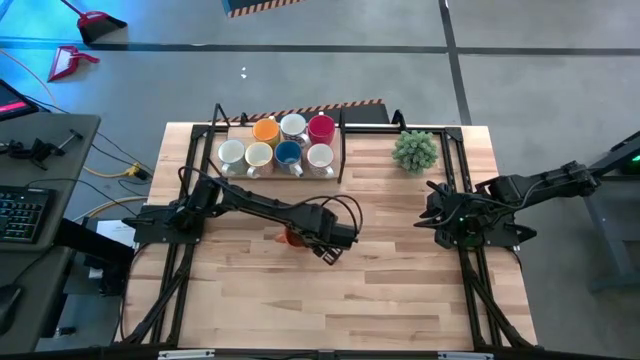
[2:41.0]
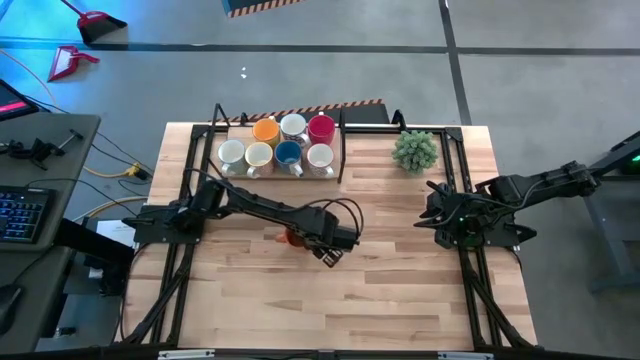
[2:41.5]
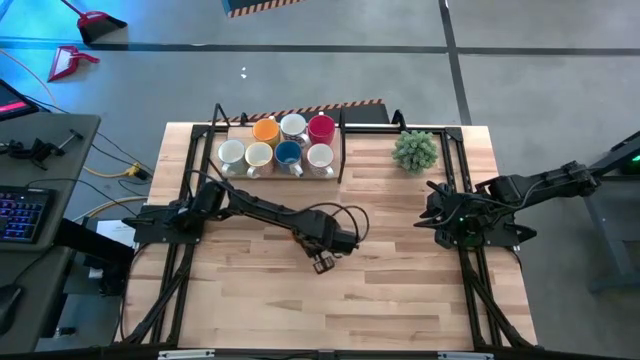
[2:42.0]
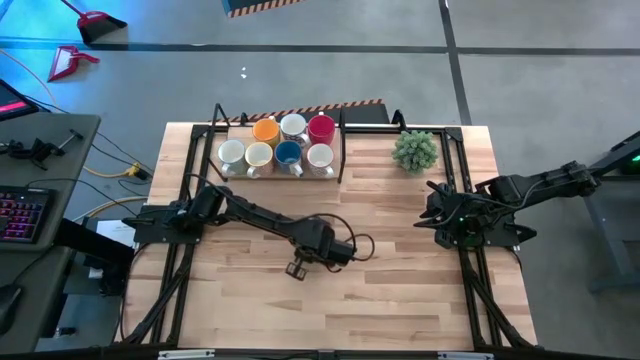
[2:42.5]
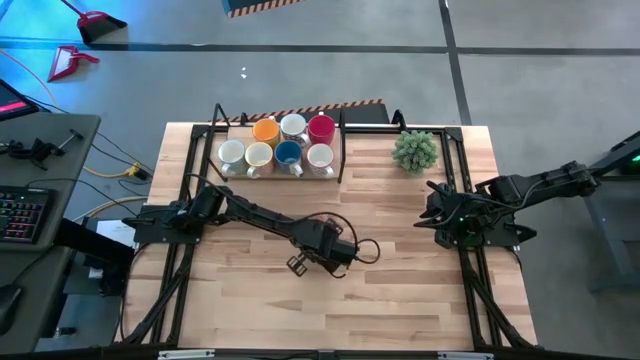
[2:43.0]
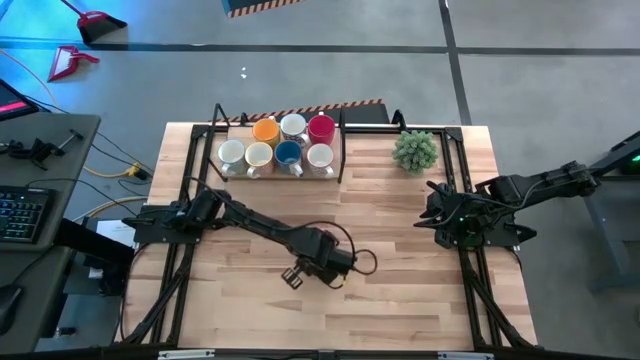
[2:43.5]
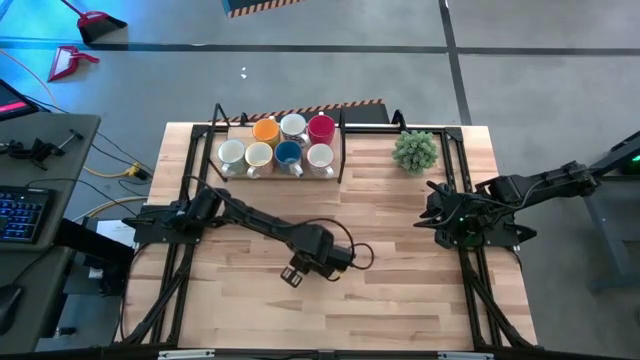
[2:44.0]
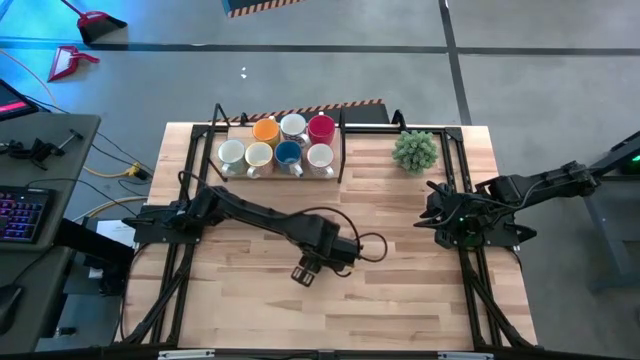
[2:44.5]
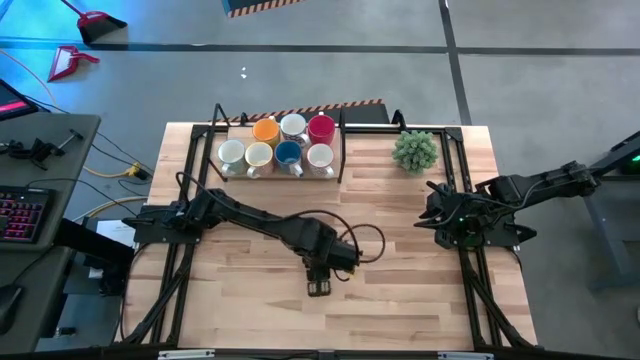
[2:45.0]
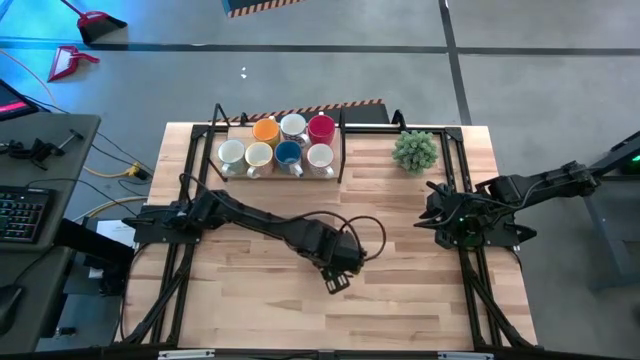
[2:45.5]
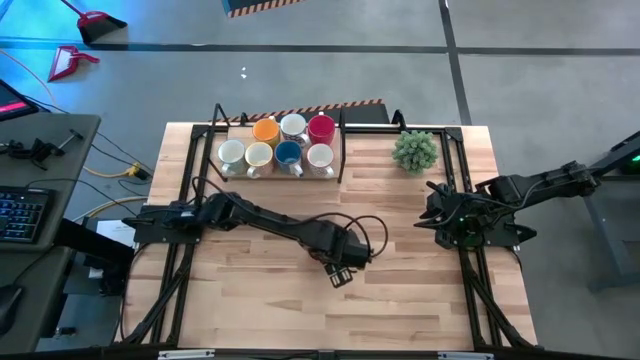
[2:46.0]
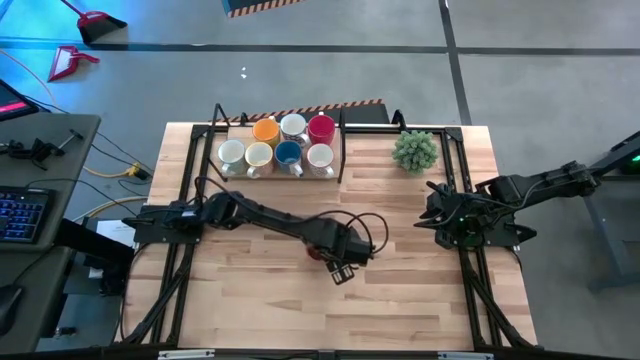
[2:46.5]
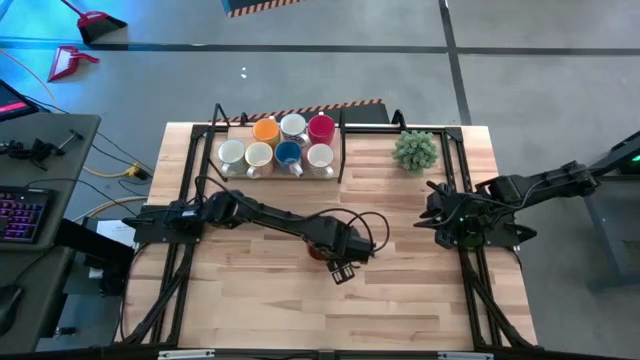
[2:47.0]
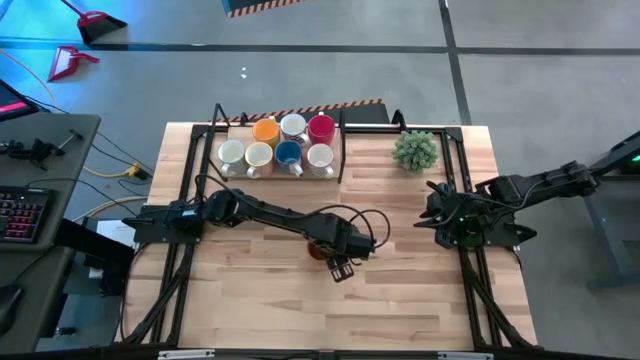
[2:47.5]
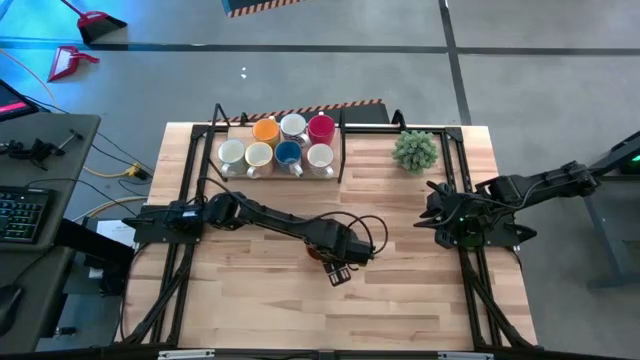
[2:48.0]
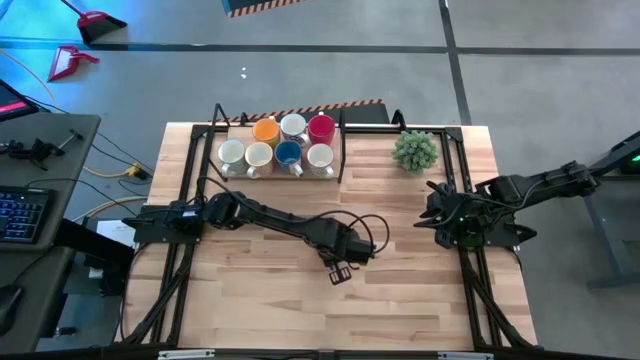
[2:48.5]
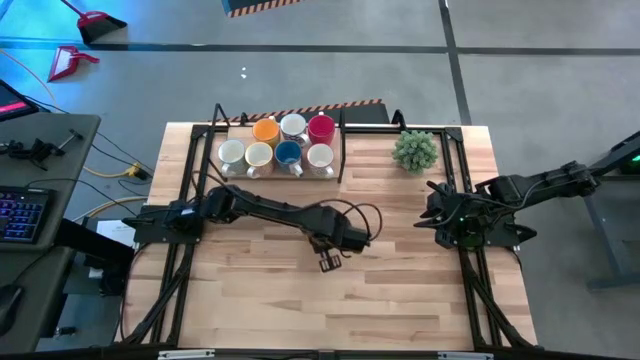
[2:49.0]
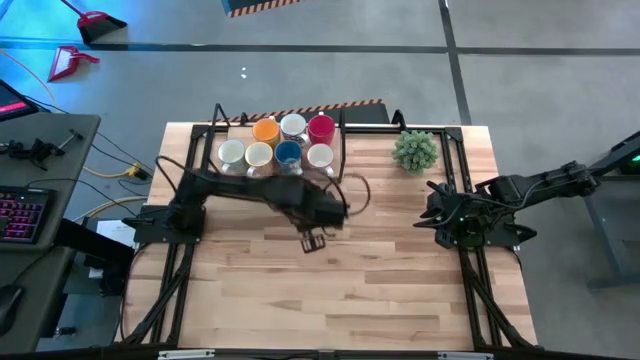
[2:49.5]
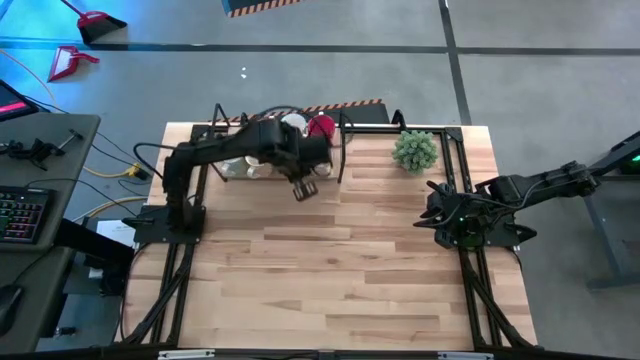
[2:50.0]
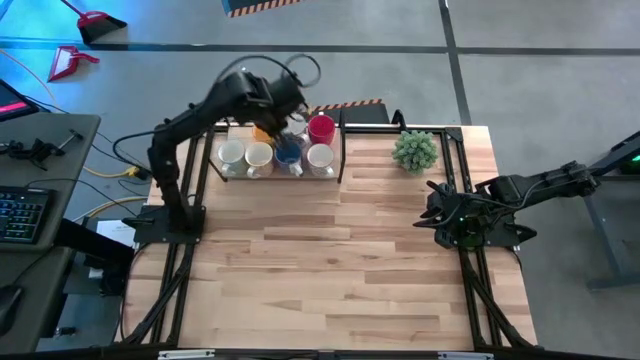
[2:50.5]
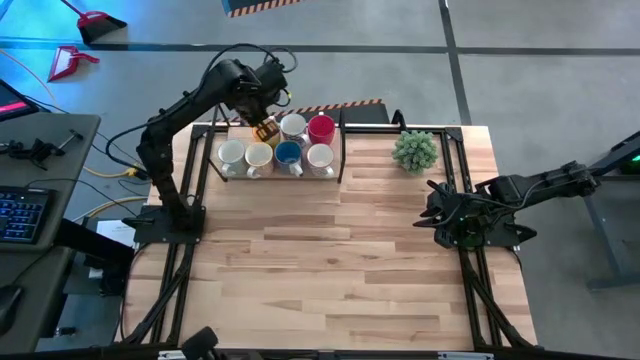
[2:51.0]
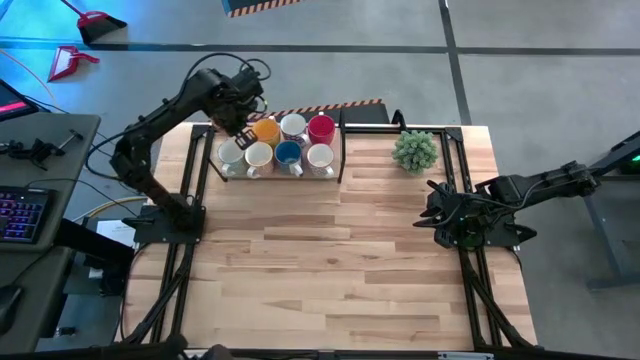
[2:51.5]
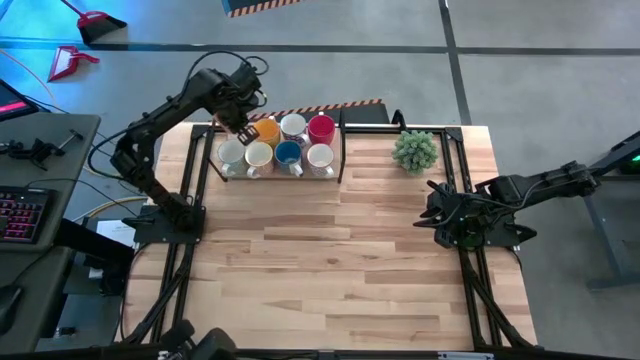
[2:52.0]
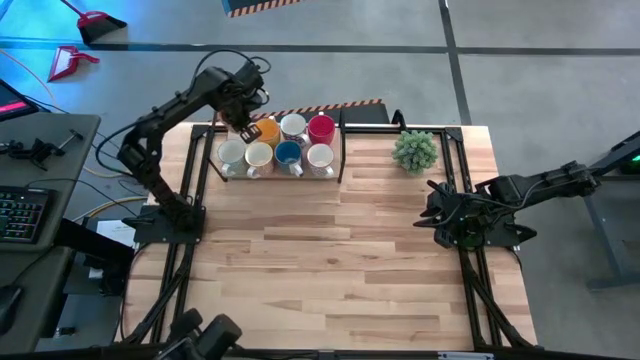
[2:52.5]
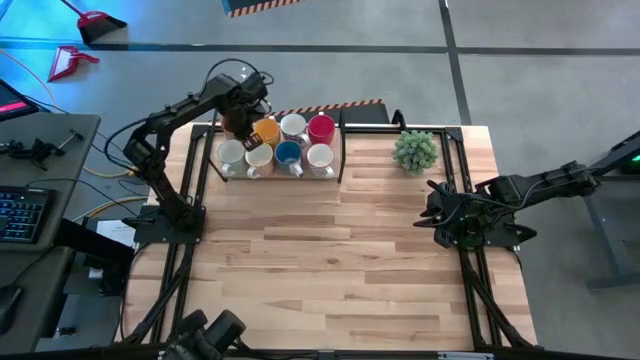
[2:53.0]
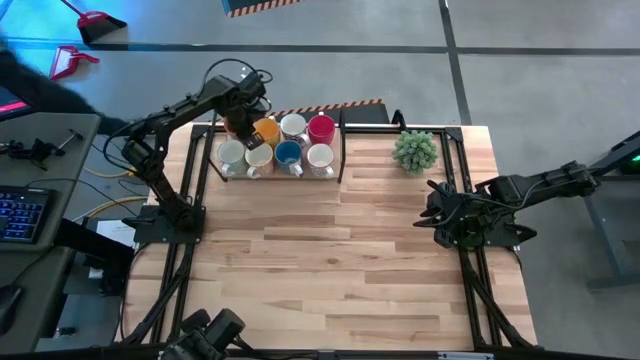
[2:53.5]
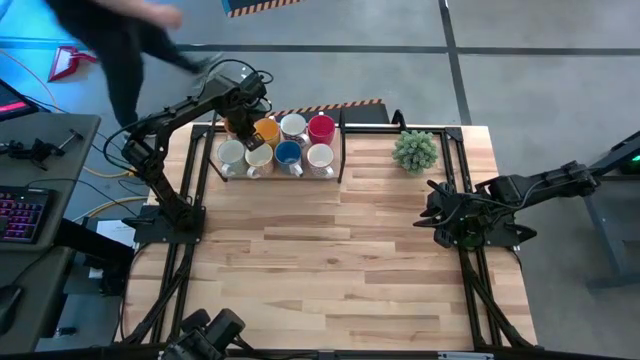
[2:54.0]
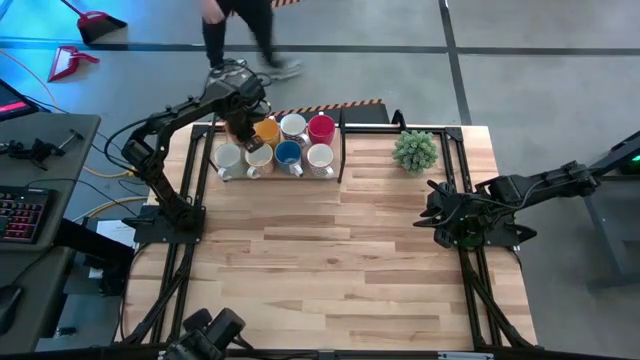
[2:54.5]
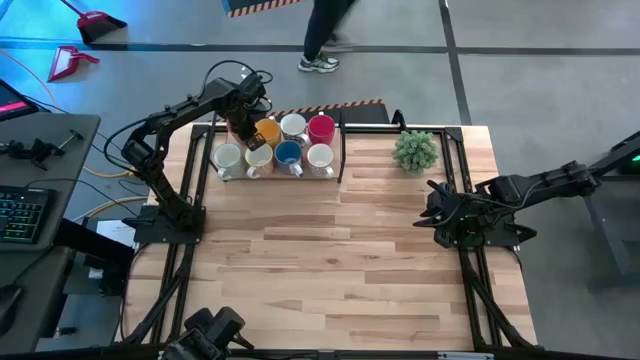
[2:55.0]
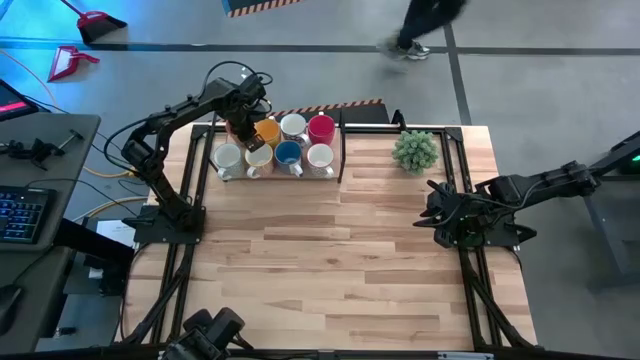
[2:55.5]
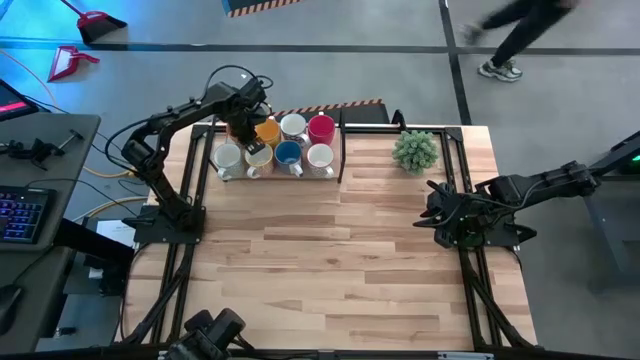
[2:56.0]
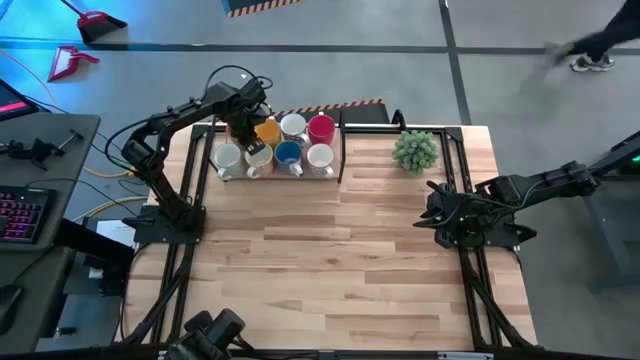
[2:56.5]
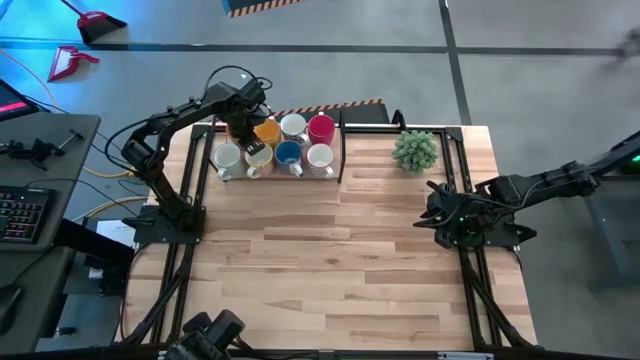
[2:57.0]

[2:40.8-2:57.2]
Task: Place coffee mugs
Put the orange mug on the shelf
